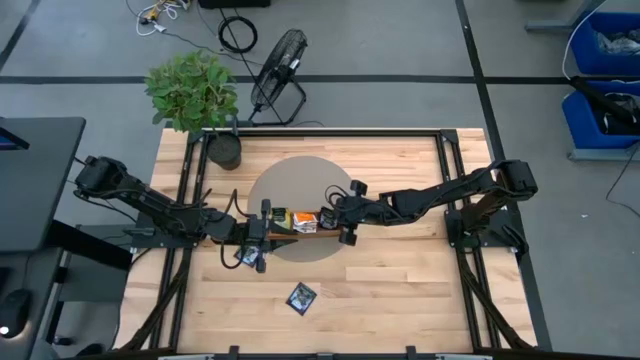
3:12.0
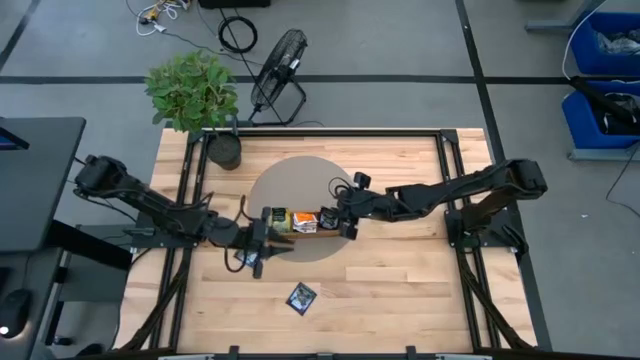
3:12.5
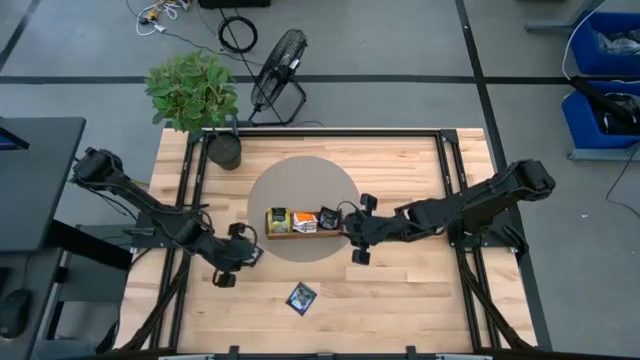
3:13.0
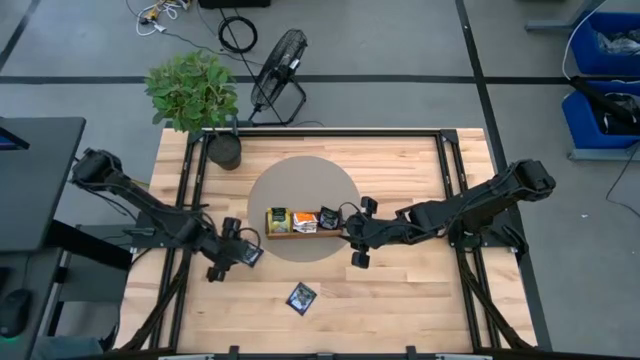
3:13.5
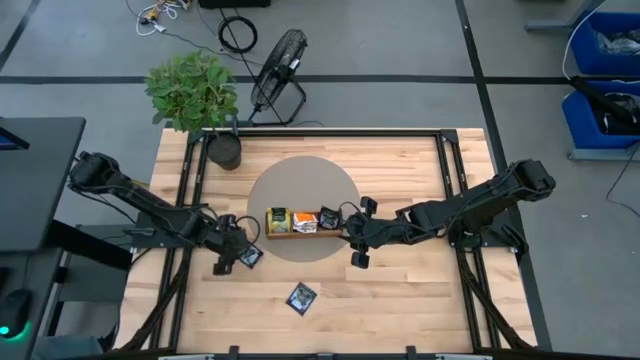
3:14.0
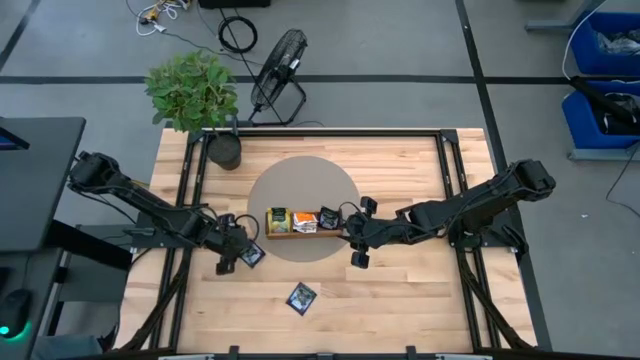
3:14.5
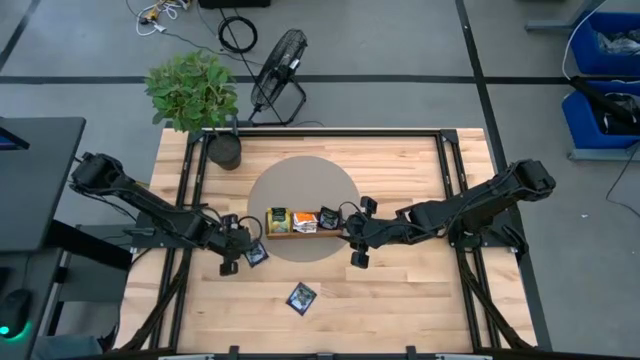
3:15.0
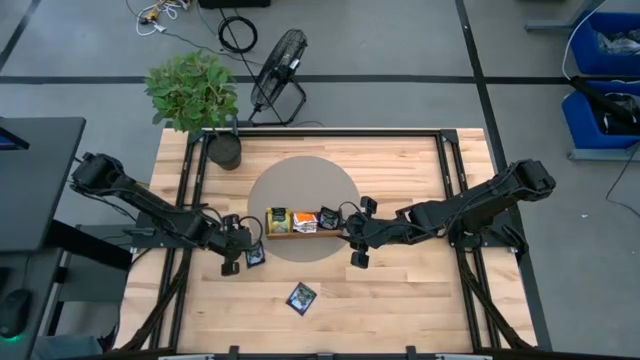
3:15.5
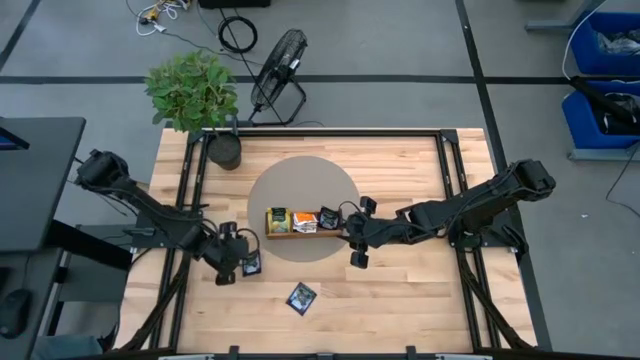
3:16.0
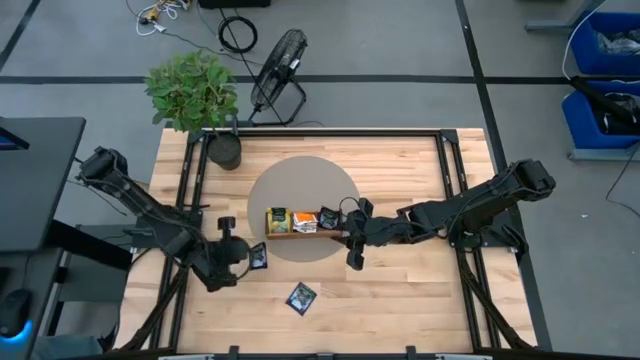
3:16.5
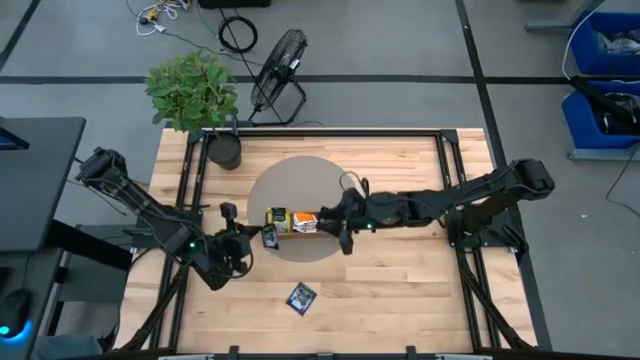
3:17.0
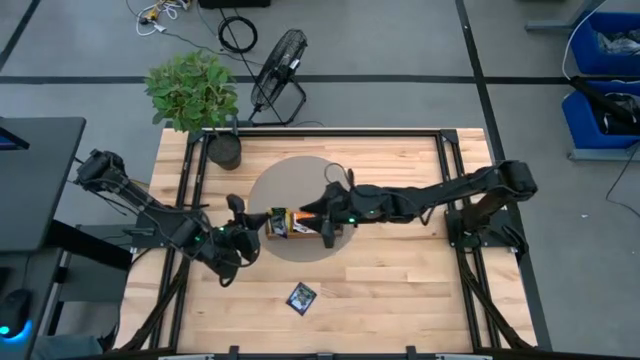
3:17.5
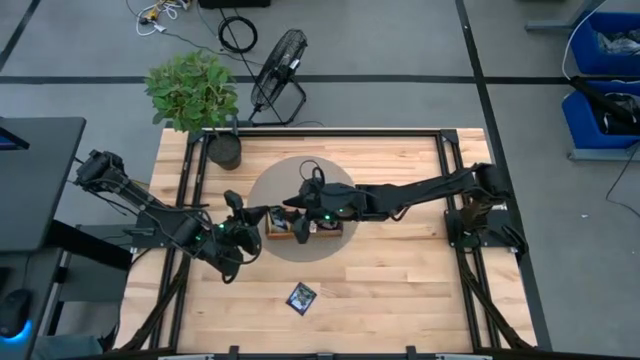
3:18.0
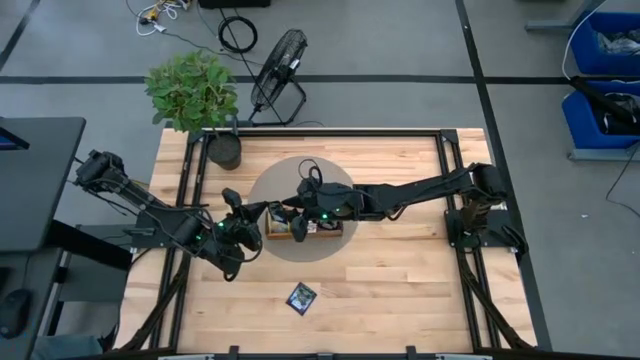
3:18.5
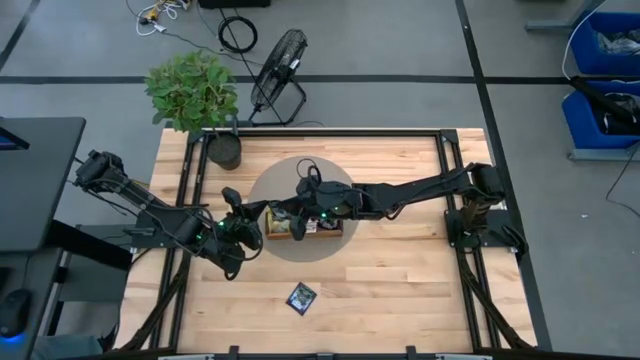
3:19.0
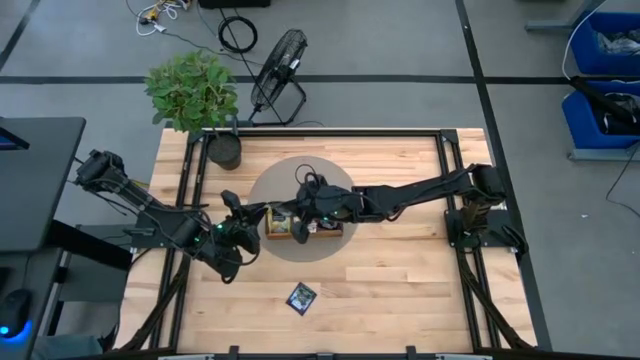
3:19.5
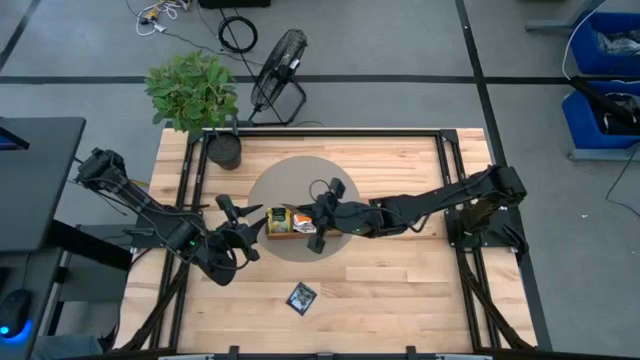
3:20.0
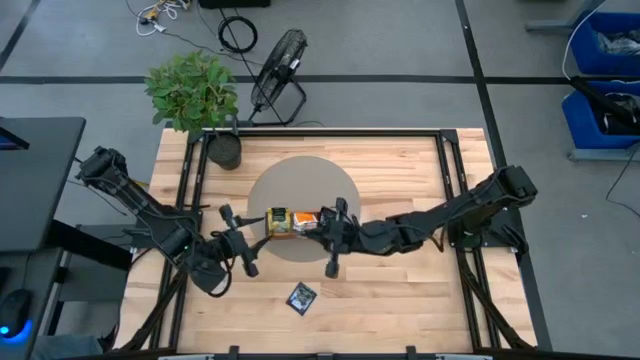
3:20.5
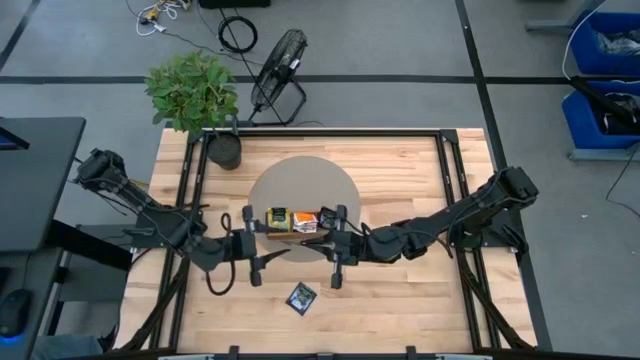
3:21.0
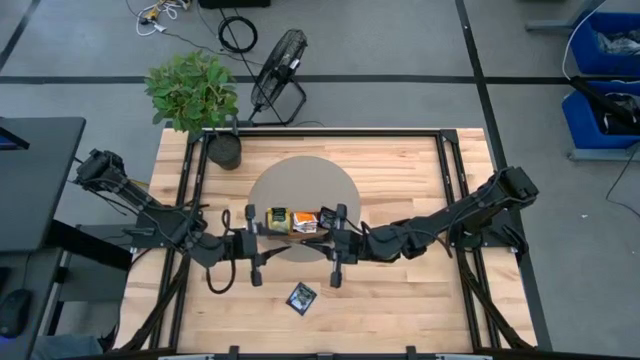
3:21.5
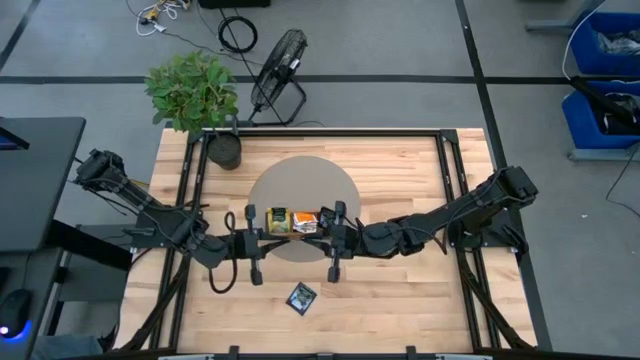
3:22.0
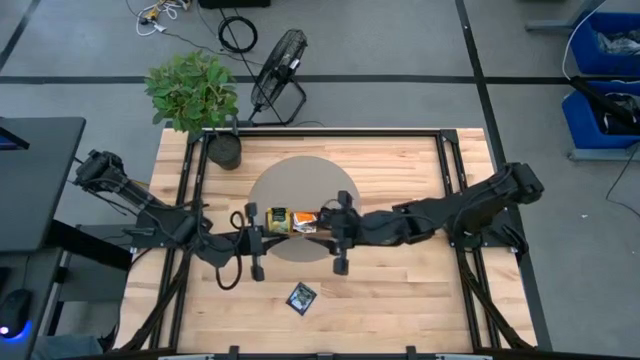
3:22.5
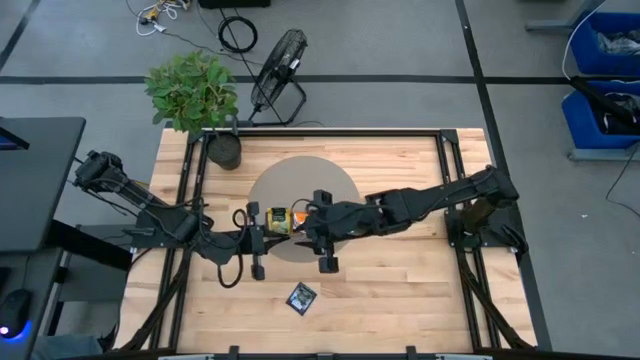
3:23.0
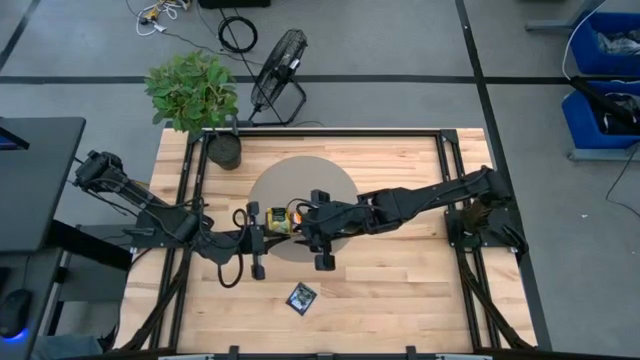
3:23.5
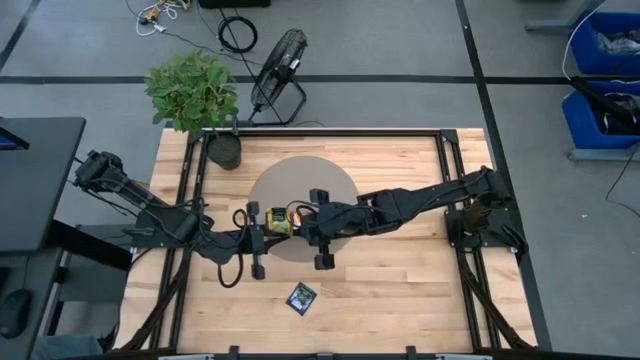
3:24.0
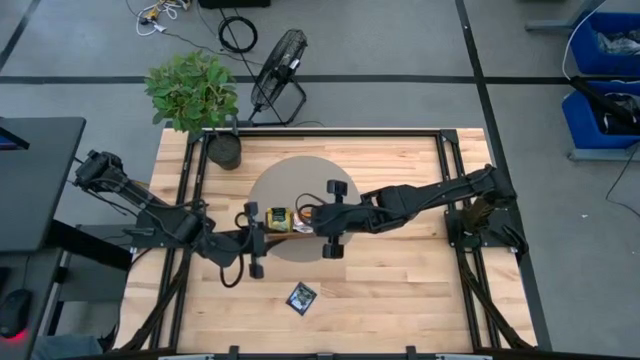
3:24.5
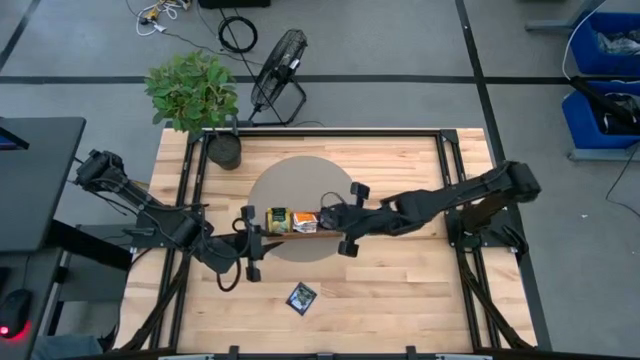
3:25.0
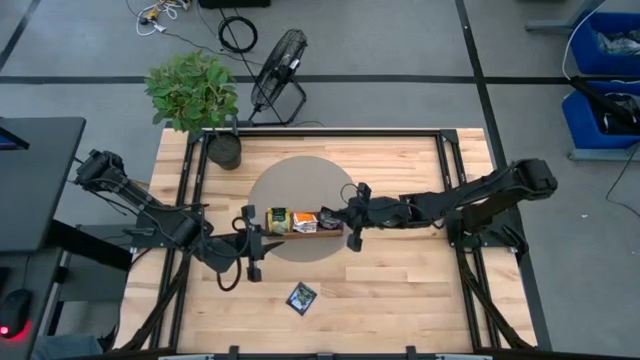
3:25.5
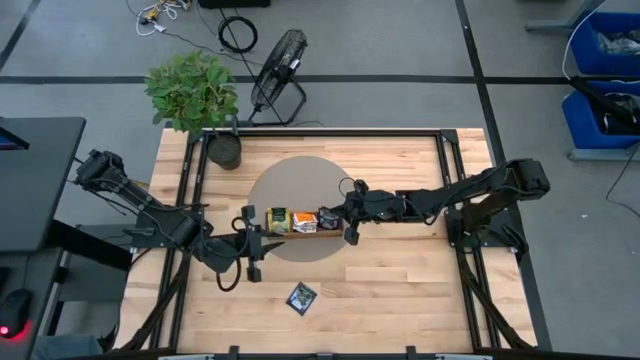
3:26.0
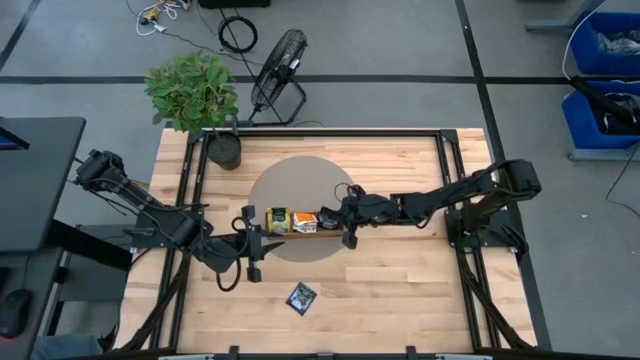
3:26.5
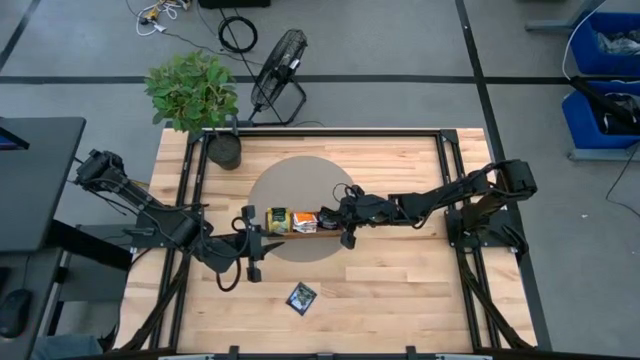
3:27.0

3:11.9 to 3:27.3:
Task: Pick & Place Tea
Put the top violet tea bag into the wooden organizer
